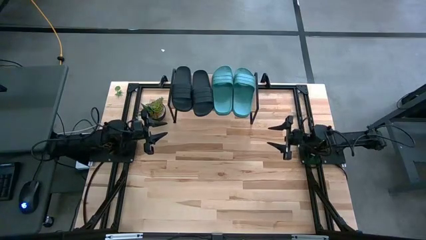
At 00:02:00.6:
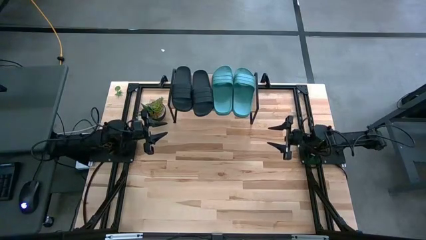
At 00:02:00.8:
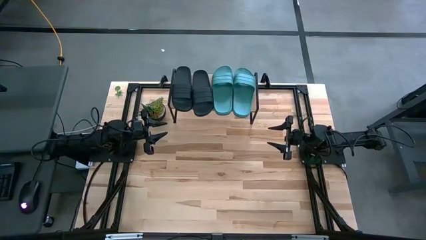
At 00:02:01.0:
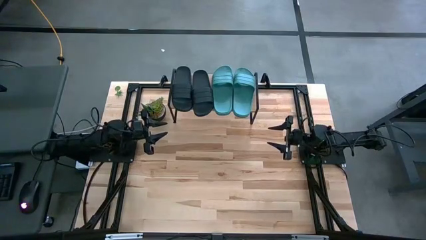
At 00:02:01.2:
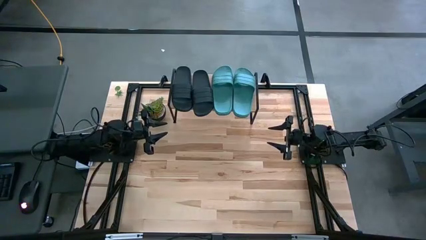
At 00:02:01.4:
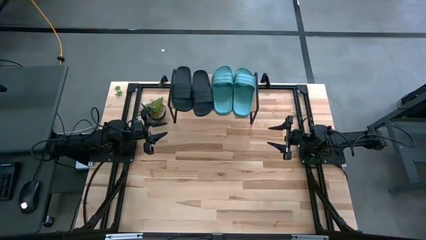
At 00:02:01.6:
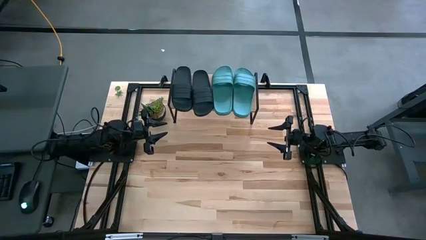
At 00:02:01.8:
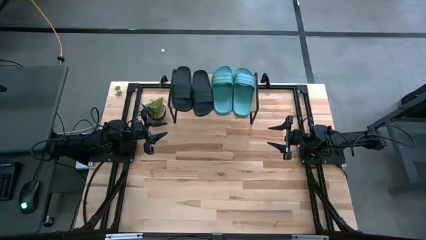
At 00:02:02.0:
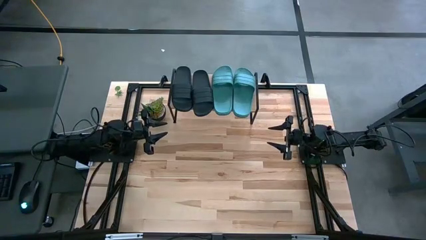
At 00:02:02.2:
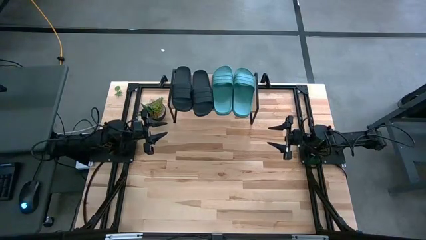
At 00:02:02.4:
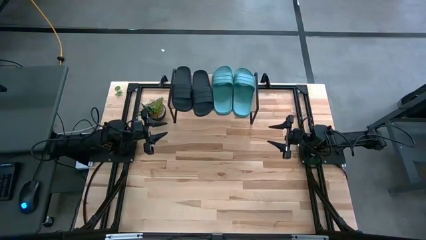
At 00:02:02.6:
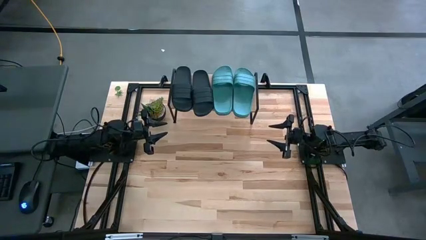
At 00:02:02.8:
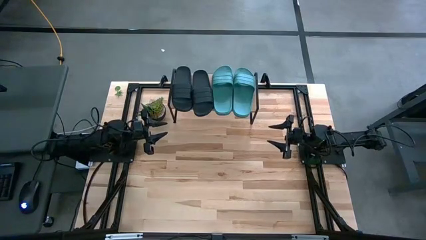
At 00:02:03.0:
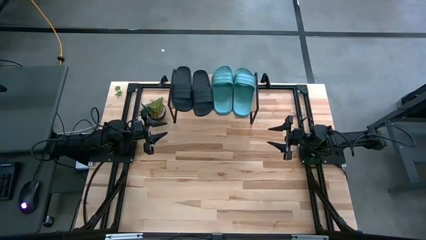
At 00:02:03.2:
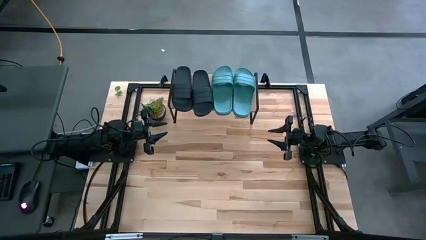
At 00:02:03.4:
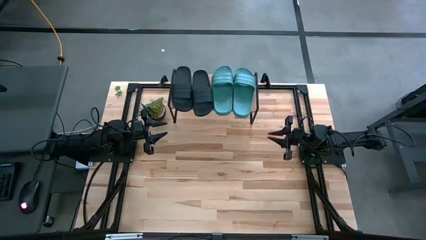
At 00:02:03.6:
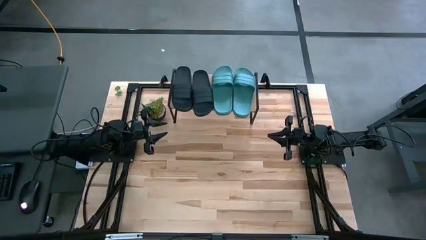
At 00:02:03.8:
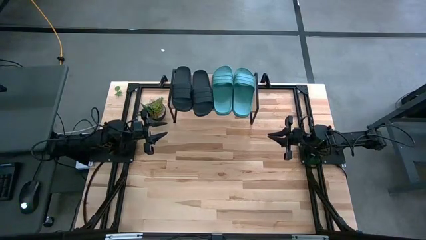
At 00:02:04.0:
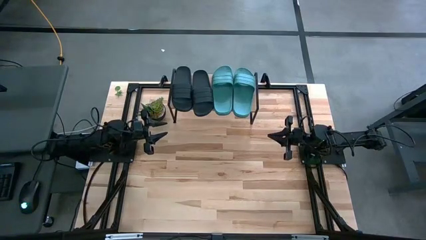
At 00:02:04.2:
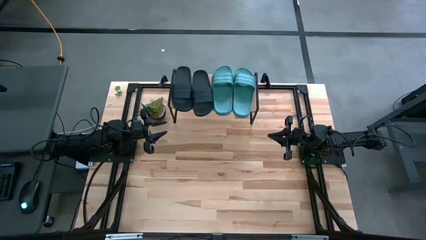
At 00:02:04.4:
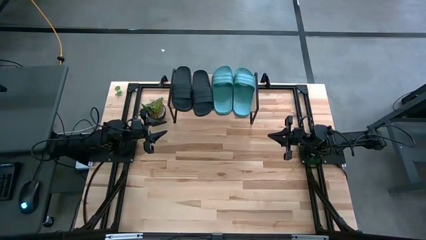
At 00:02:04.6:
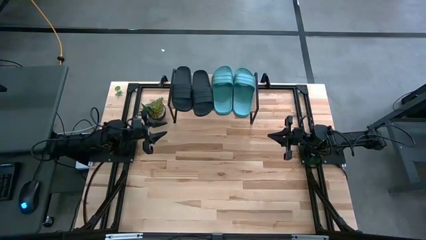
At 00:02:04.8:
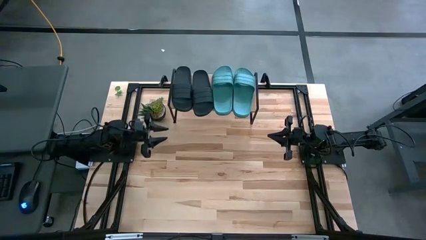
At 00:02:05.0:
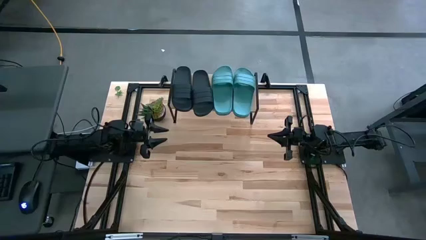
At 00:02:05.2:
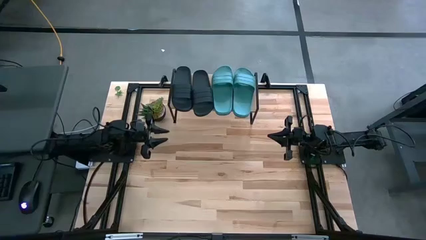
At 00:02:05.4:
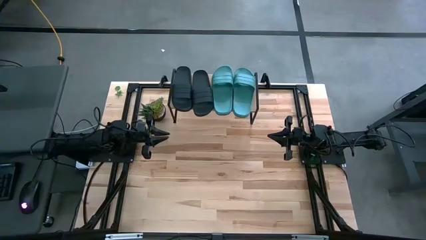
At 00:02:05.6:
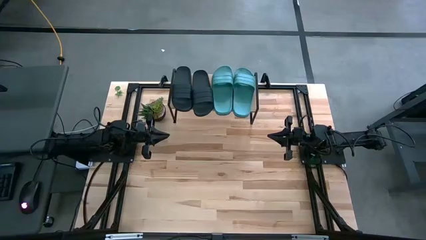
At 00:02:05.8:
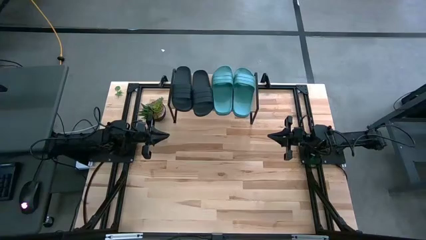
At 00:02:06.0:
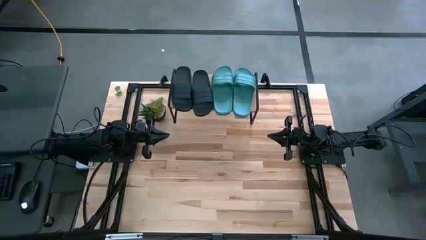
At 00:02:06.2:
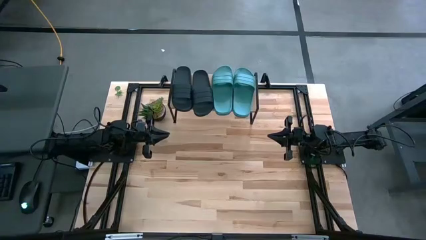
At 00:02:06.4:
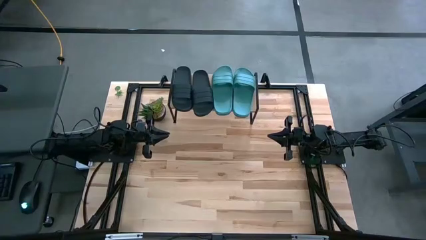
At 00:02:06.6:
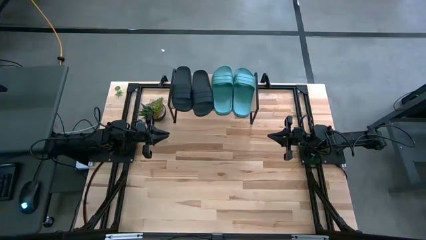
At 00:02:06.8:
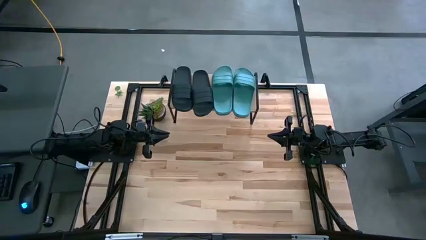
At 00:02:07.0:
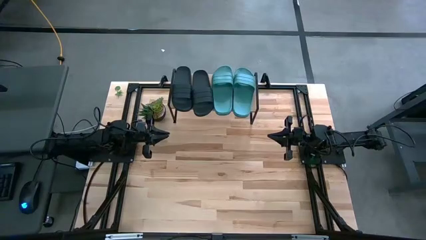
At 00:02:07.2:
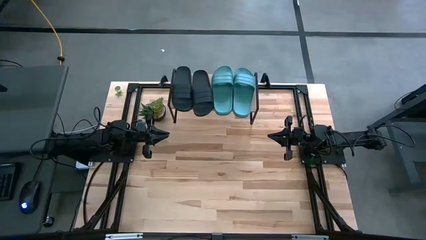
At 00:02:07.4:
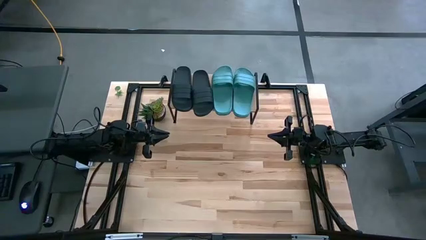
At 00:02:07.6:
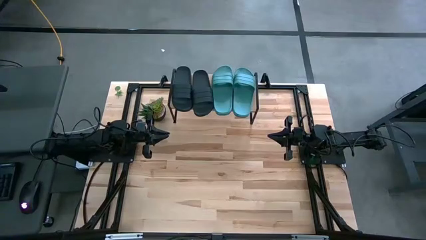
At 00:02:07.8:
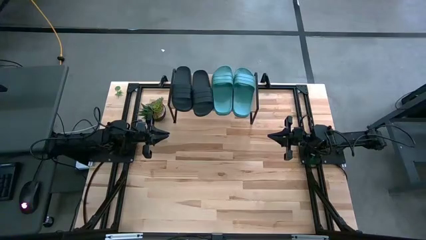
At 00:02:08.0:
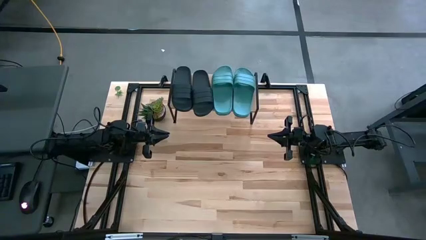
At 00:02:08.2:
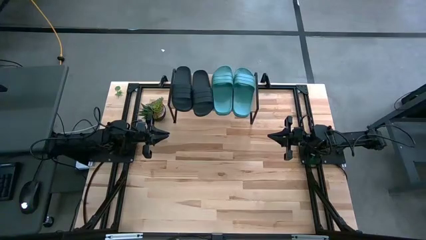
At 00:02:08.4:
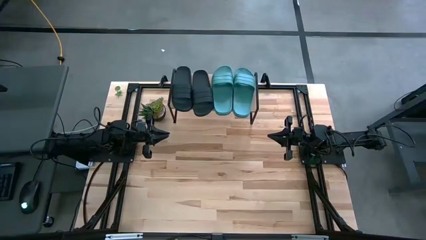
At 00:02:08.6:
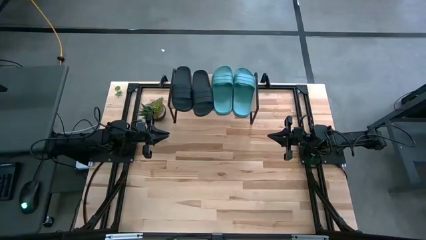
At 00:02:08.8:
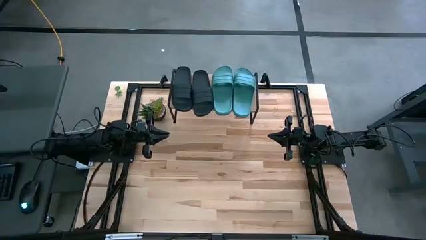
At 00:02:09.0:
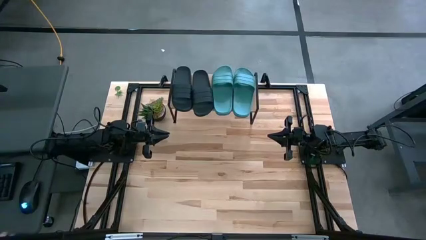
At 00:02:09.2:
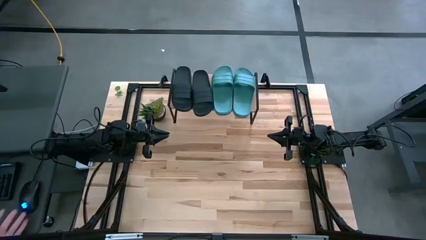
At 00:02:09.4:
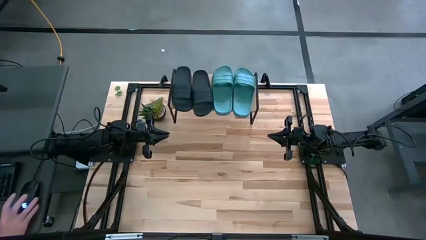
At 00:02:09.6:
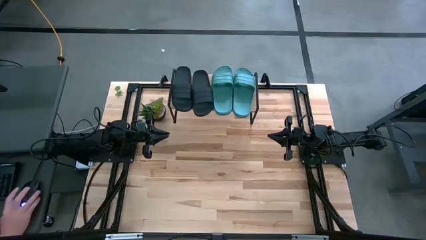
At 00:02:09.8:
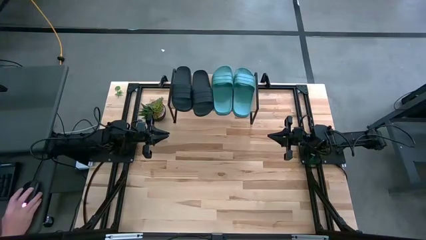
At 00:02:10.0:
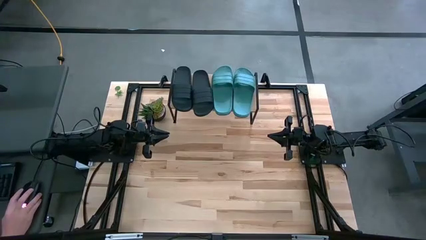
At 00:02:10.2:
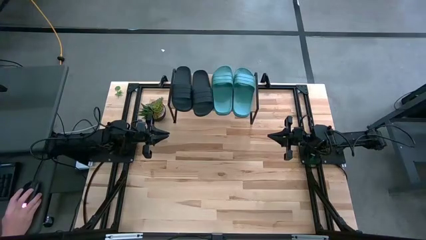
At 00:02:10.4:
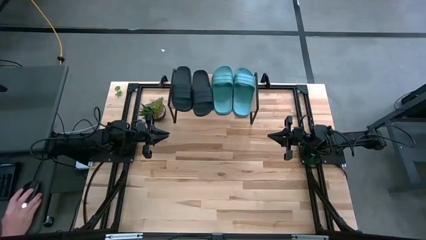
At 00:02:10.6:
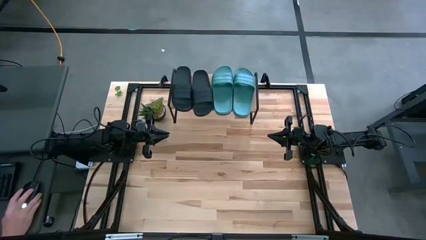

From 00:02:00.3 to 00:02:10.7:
Task: Pick and place slides into the shelf
Return to Home Position

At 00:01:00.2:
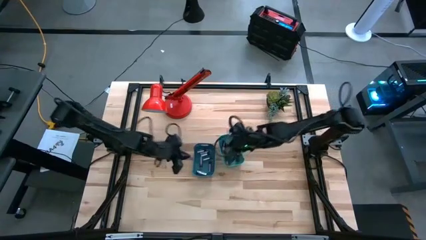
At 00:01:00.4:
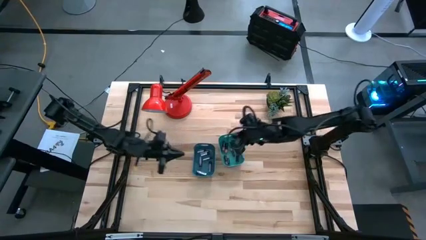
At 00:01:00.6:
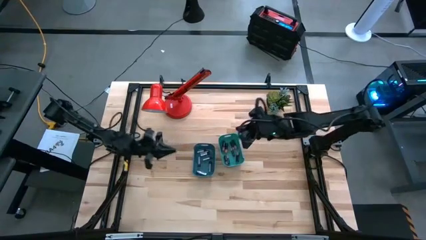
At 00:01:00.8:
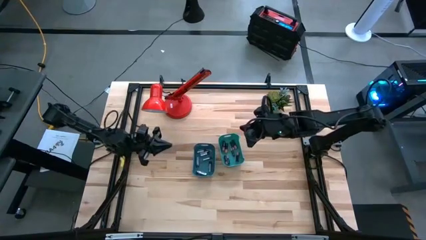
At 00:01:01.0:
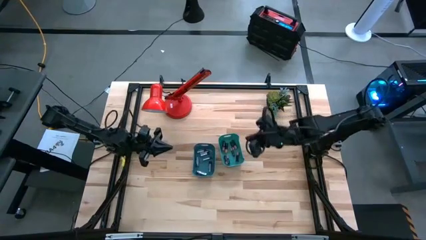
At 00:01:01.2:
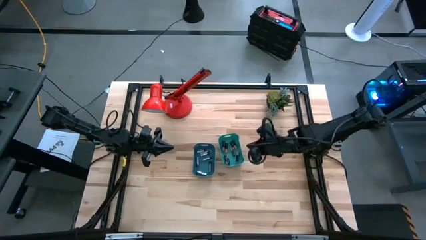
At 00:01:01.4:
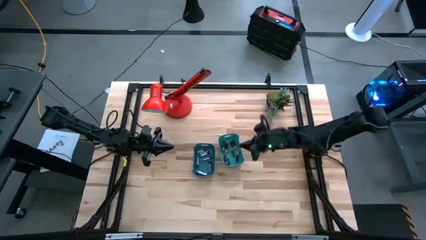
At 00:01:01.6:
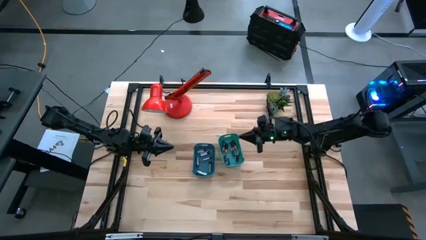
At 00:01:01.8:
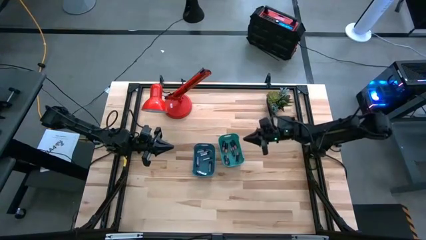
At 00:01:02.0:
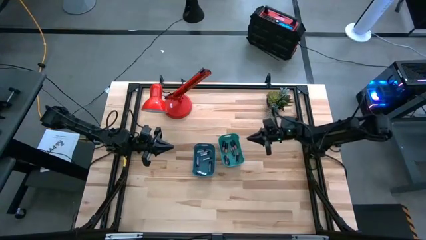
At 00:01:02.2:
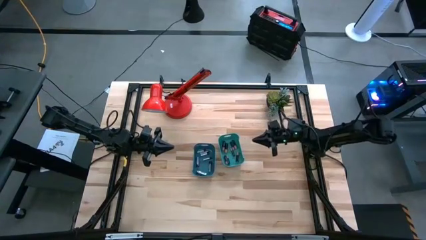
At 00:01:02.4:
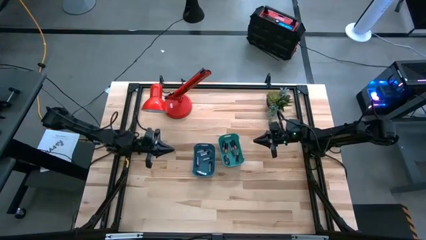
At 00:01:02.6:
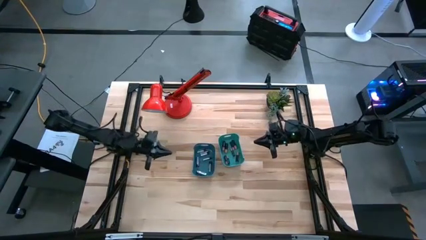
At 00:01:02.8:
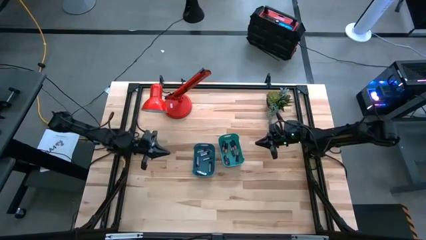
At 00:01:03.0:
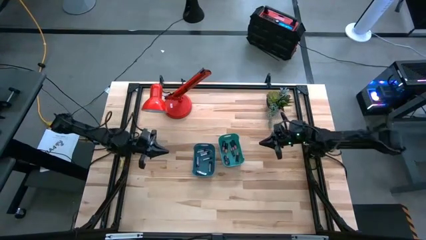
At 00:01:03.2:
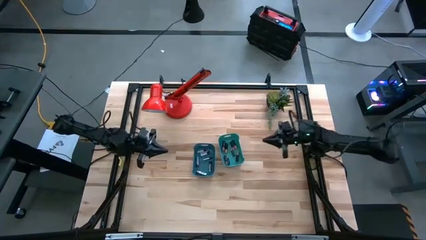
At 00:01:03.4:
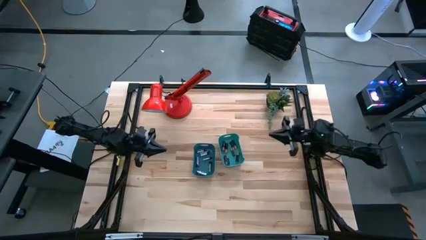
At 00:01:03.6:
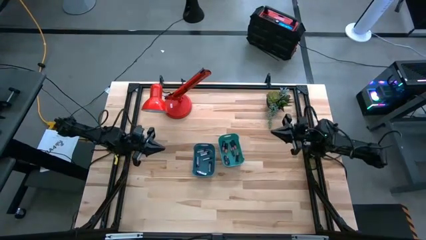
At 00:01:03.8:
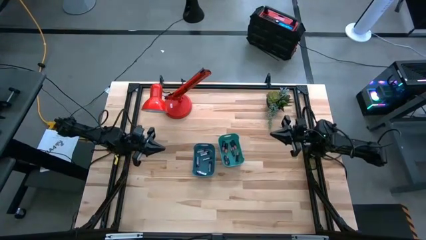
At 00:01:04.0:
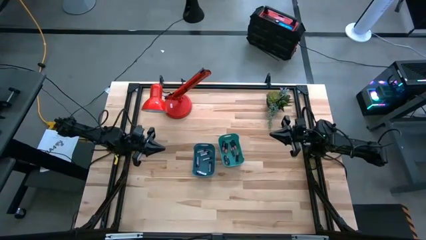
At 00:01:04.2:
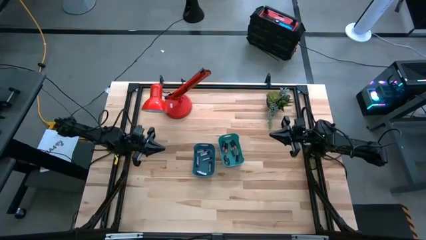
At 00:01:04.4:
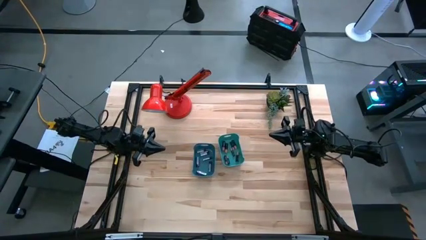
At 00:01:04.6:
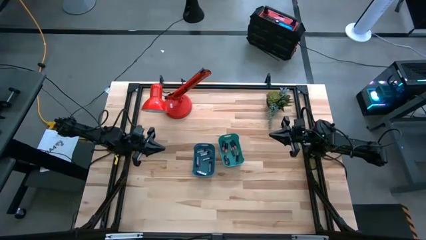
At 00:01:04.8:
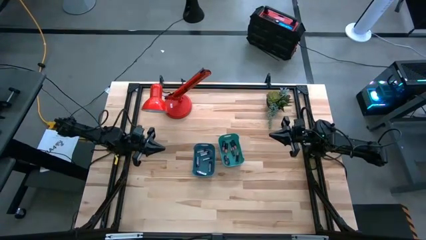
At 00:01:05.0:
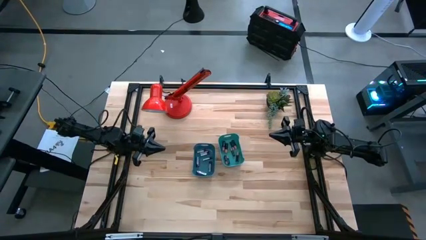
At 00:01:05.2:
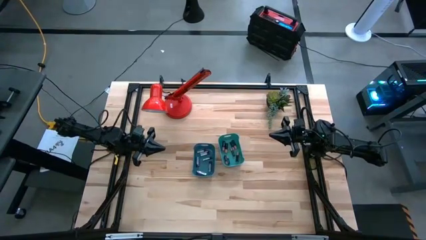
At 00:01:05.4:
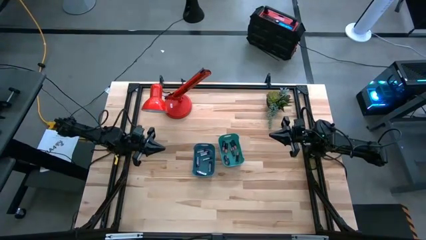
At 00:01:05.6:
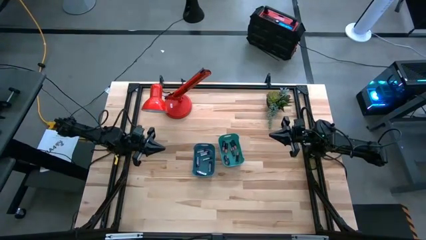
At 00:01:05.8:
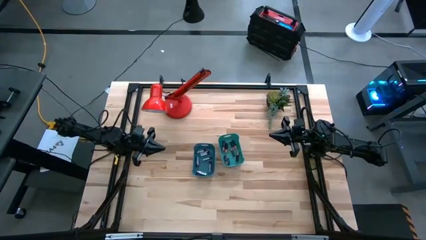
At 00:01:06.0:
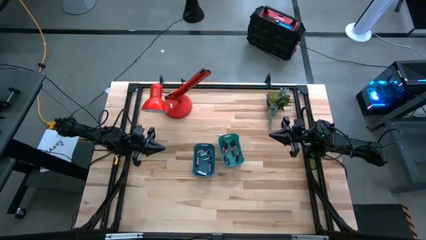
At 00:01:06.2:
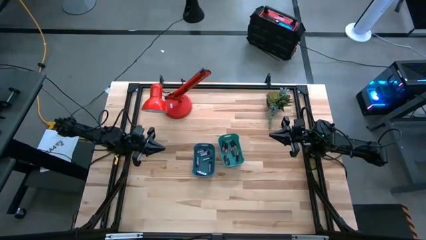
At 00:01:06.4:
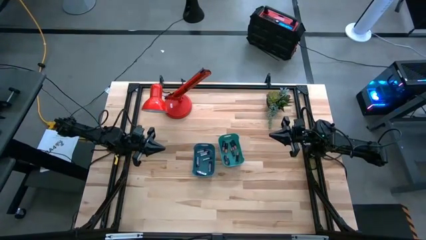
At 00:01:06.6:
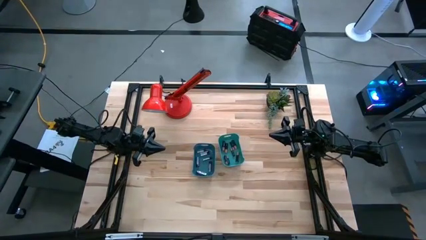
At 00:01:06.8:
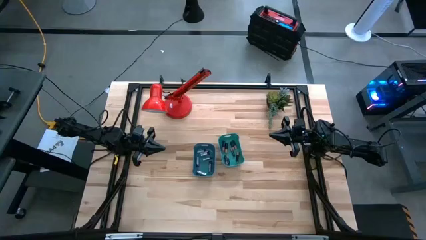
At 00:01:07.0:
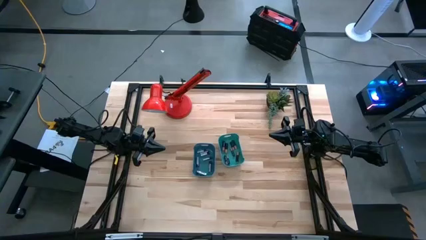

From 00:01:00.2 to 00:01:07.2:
Task: Sort batteries
Return to Home Position
